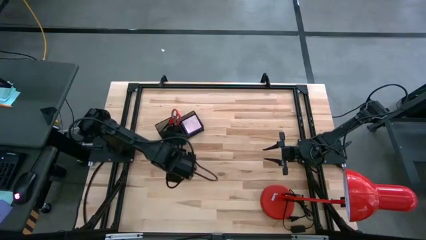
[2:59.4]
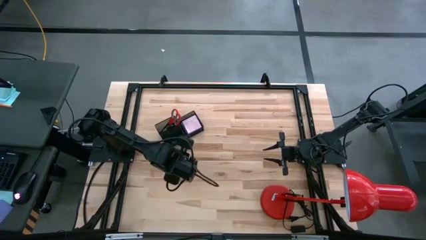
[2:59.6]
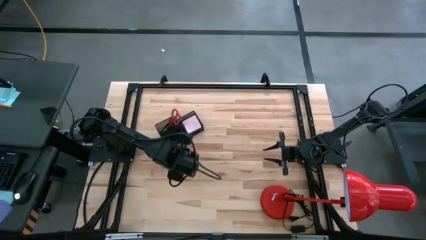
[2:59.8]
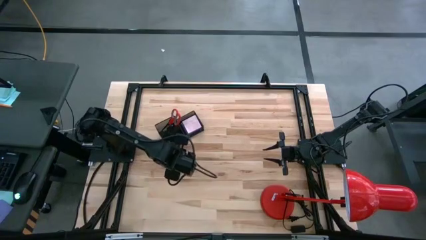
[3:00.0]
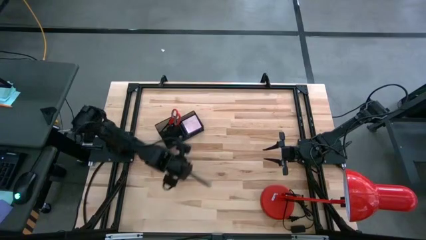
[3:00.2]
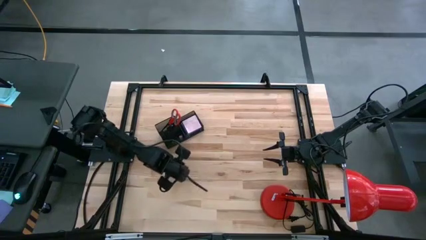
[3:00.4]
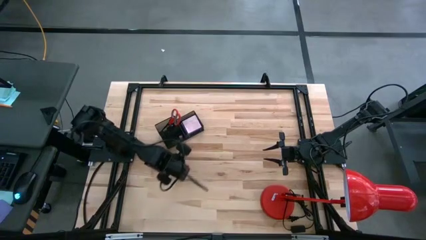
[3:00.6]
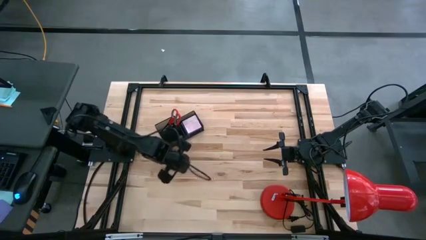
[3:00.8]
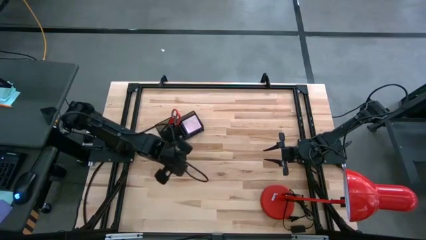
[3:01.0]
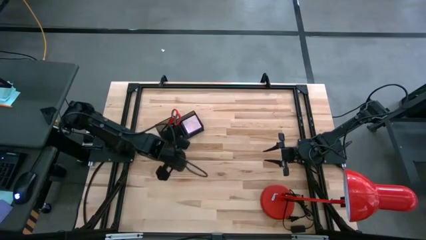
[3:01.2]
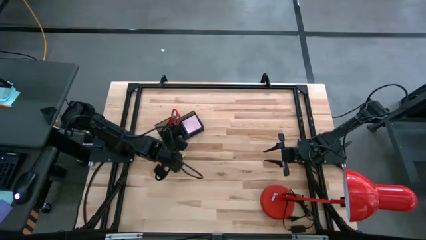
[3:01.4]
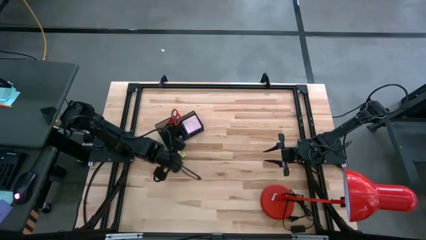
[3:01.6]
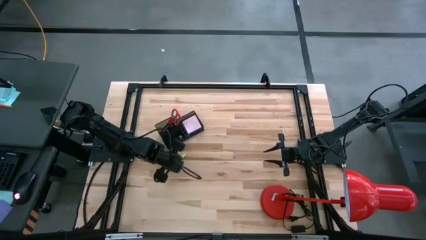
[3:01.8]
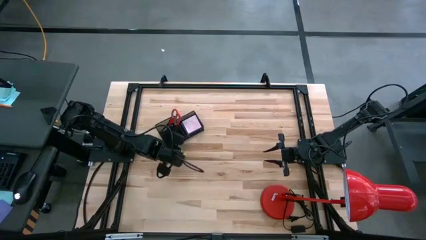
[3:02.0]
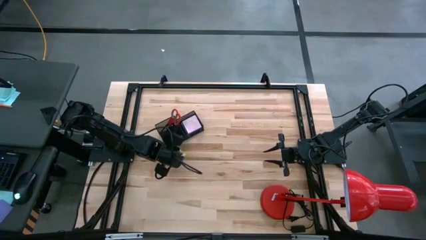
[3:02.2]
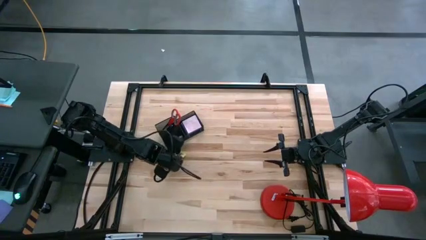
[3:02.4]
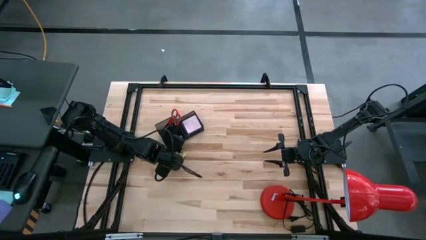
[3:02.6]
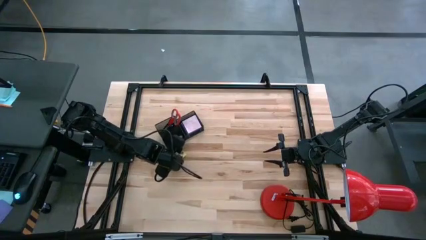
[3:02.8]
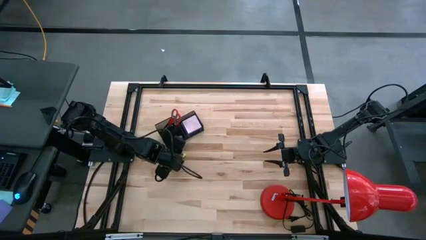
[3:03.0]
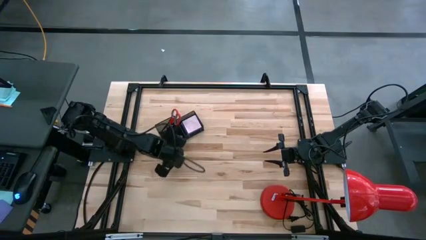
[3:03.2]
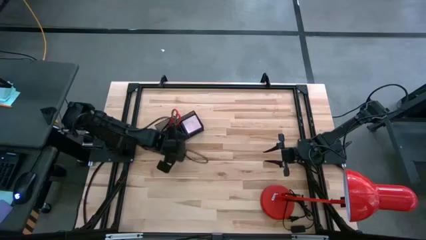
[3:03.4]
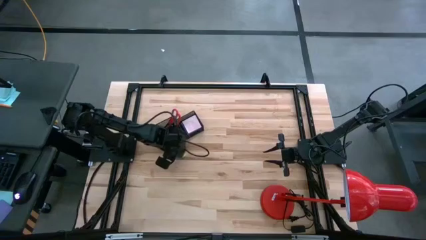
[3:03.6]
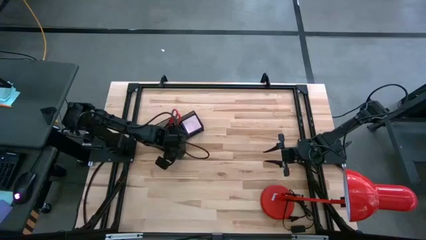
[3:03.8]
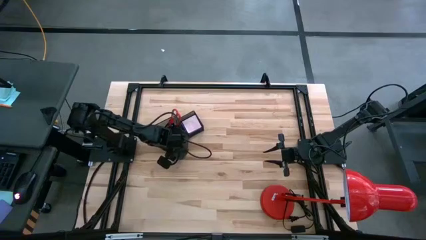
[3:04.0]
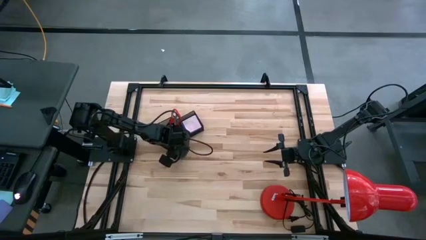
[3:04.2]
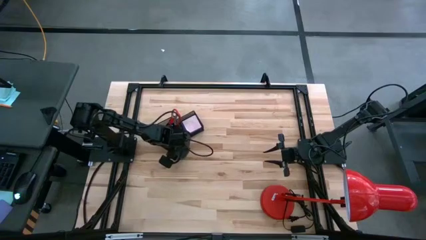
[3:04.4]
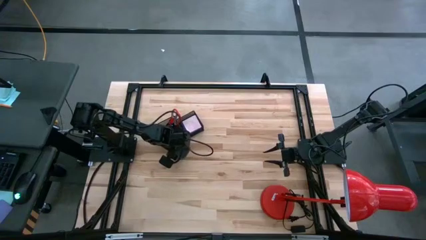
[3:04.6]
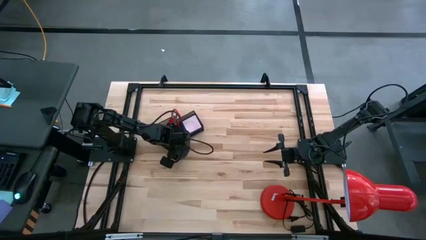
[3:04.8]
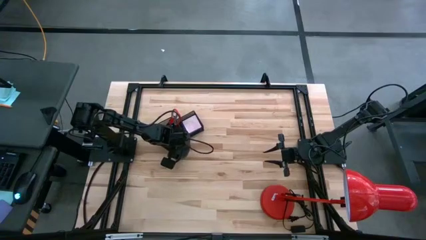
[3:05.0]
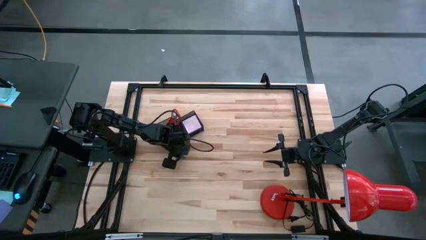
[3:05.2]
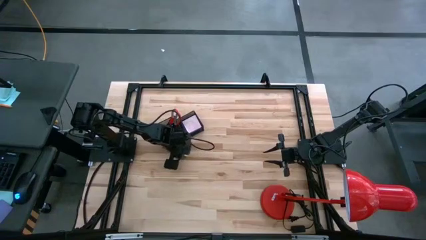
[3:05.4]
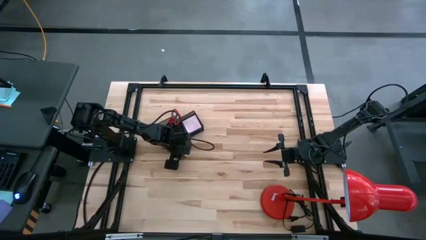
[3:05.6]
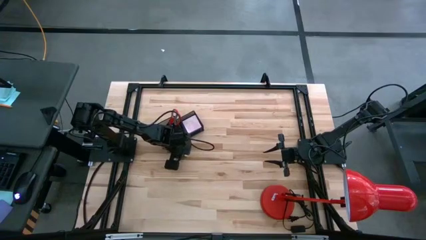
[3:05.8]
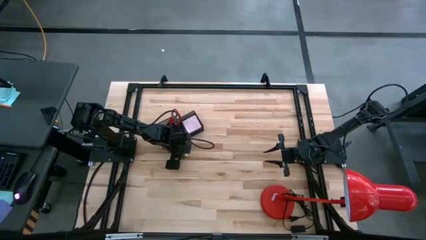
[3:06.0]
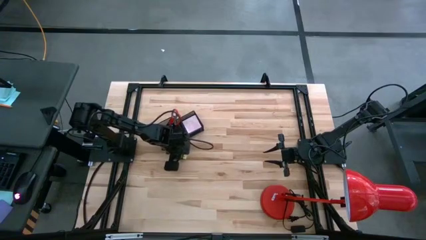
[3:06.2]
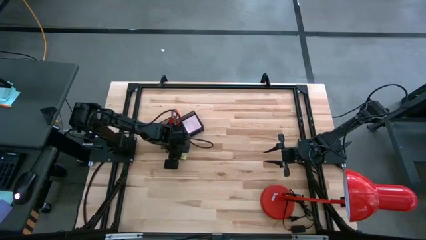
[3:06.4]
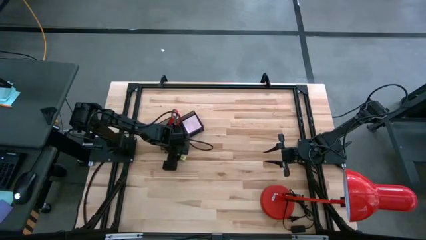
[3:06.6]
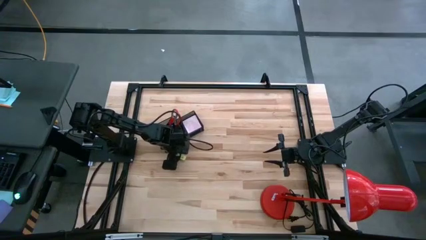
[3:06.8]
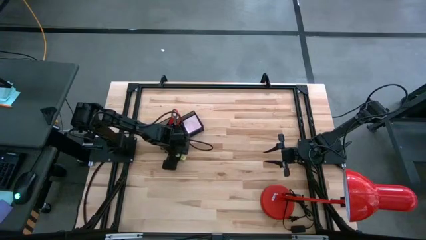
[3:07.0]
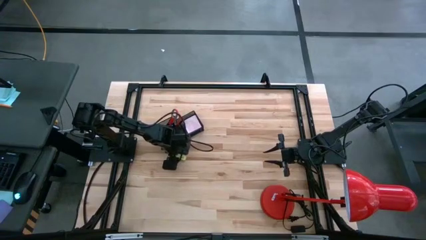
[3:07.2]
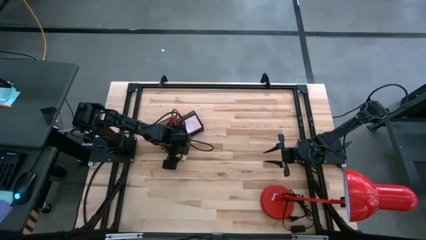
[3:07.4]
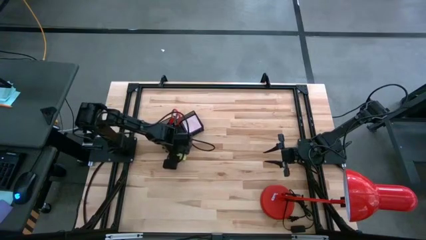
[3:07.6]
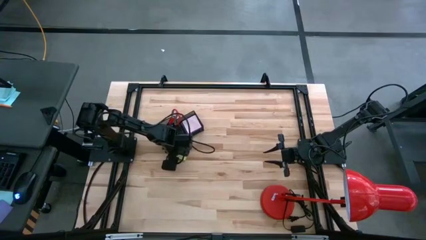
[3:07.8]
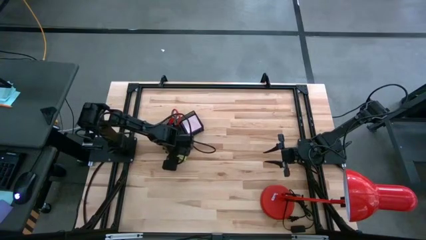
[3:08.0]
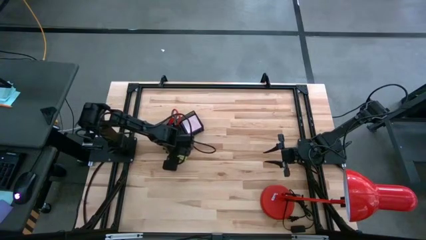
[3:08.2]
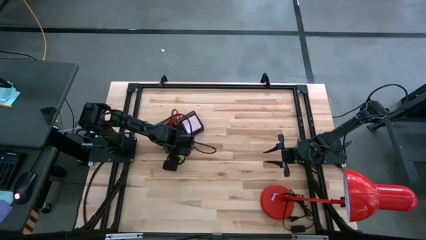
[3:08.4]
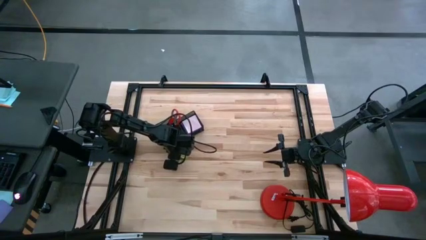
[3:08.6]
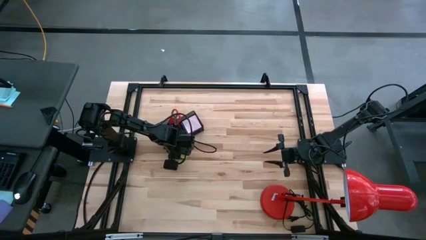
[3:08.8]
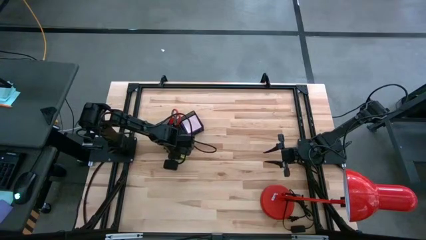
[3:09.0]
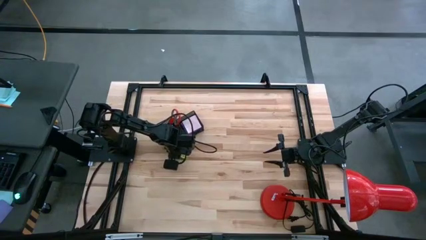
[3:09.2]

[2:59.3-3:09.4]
Task: Pick and place office supplies into organizer
Put the eraser into the desk organizer

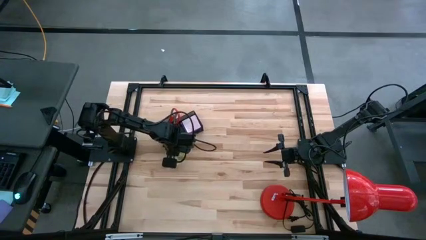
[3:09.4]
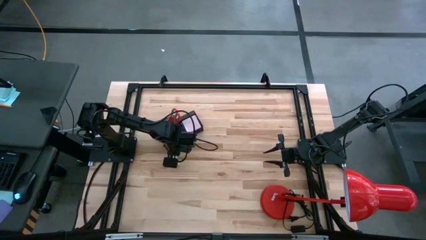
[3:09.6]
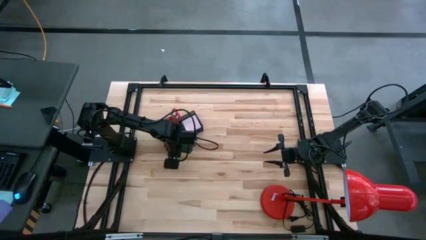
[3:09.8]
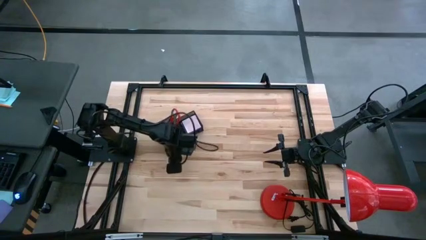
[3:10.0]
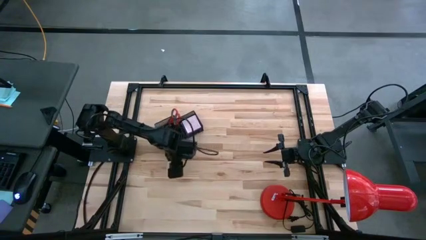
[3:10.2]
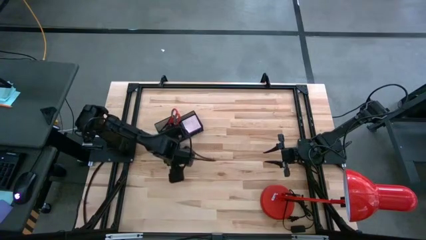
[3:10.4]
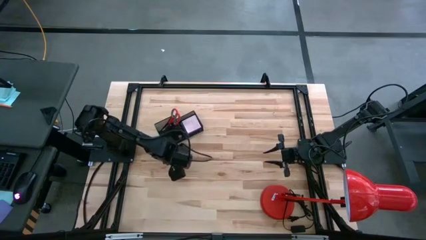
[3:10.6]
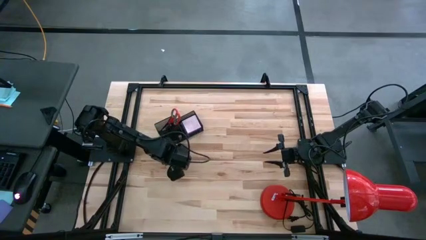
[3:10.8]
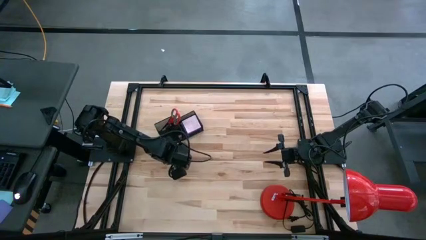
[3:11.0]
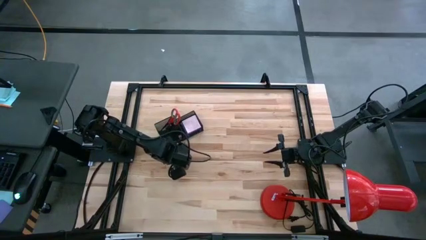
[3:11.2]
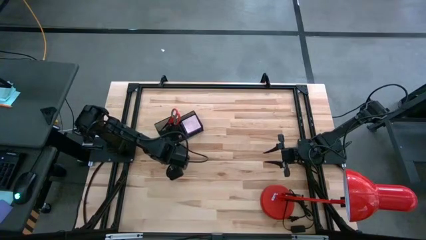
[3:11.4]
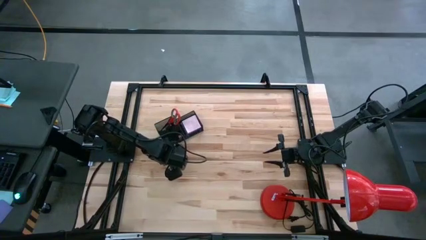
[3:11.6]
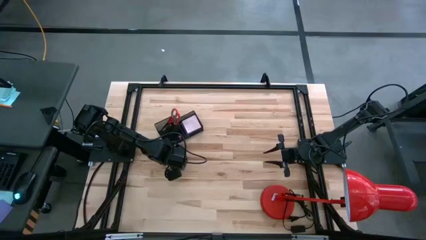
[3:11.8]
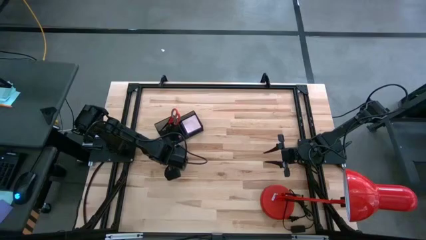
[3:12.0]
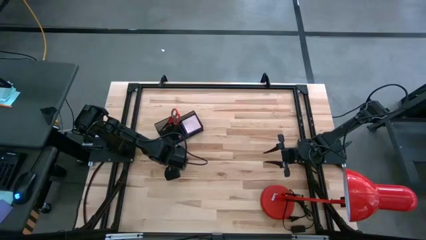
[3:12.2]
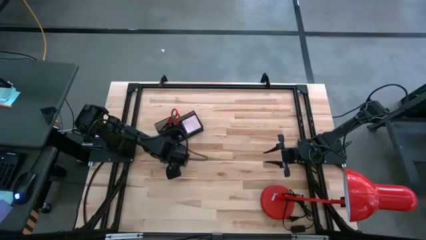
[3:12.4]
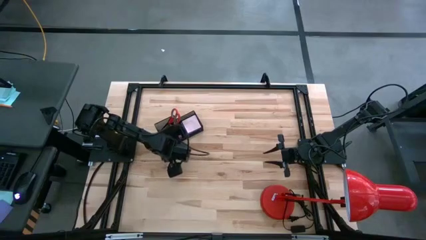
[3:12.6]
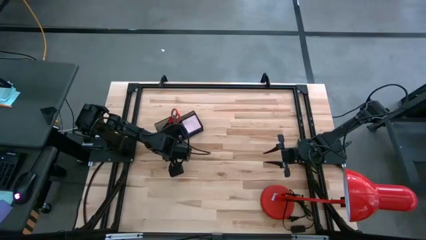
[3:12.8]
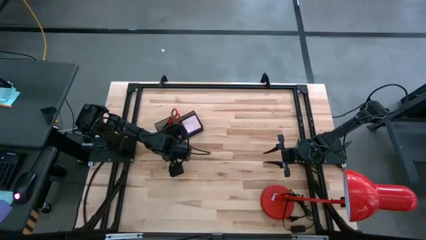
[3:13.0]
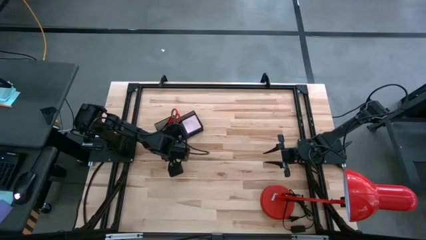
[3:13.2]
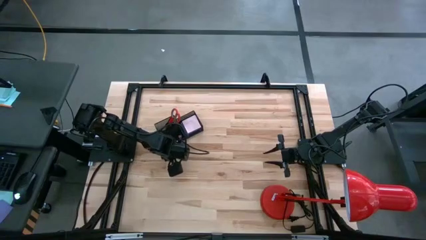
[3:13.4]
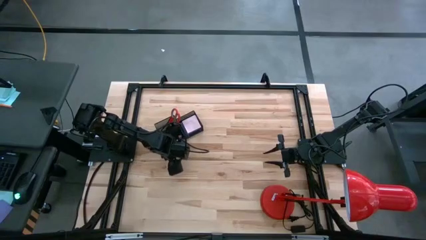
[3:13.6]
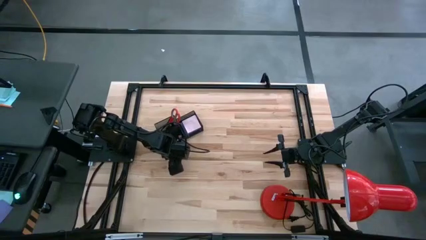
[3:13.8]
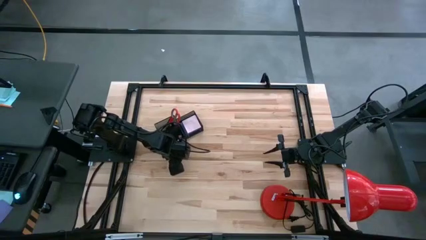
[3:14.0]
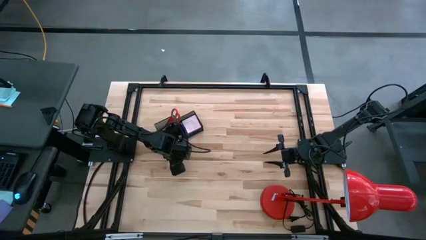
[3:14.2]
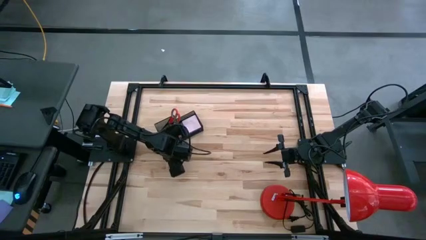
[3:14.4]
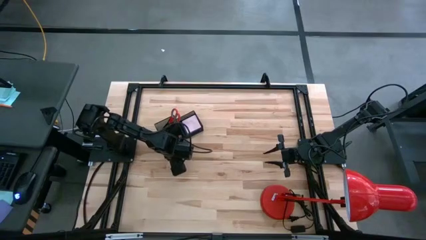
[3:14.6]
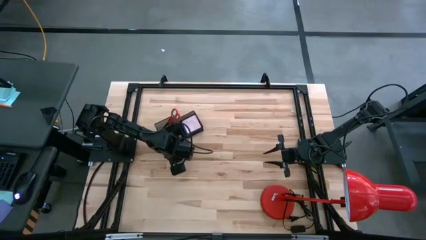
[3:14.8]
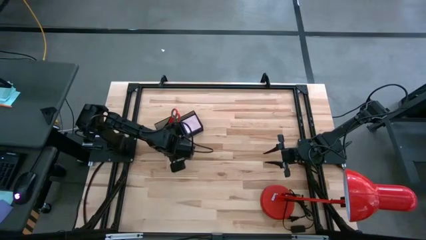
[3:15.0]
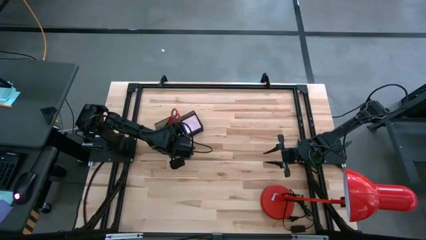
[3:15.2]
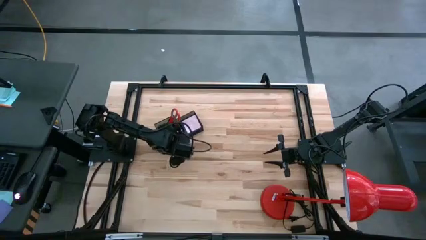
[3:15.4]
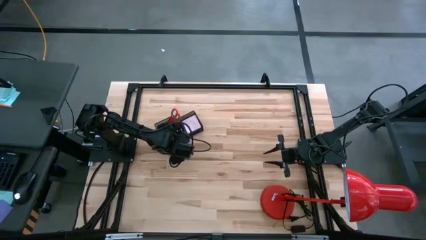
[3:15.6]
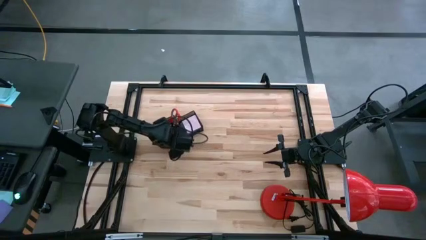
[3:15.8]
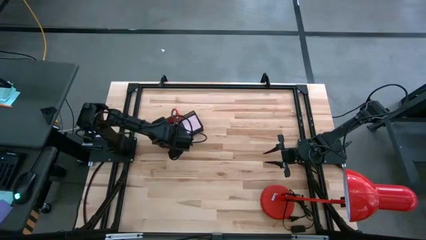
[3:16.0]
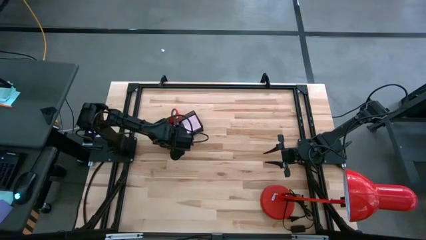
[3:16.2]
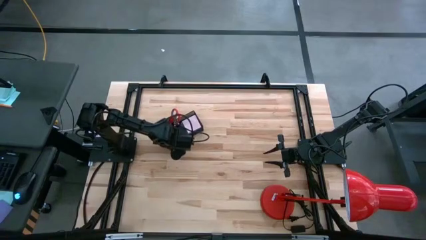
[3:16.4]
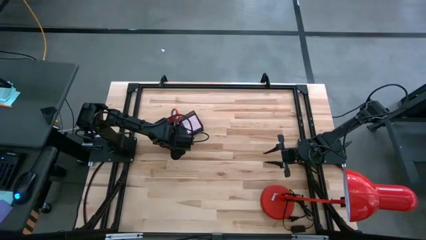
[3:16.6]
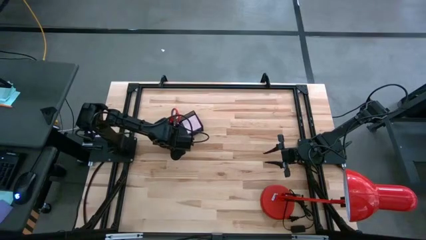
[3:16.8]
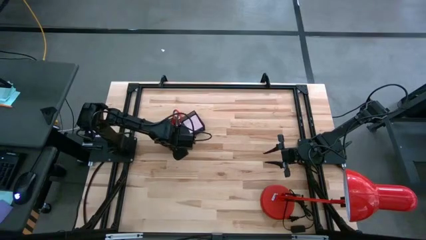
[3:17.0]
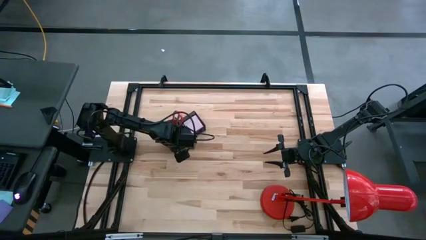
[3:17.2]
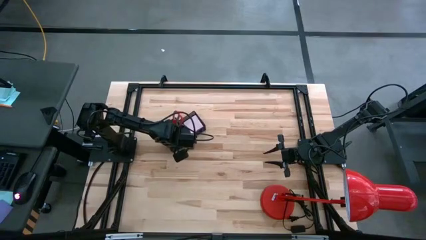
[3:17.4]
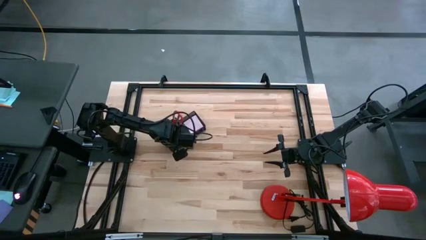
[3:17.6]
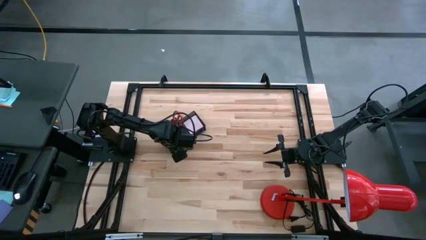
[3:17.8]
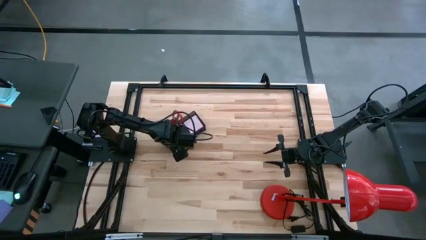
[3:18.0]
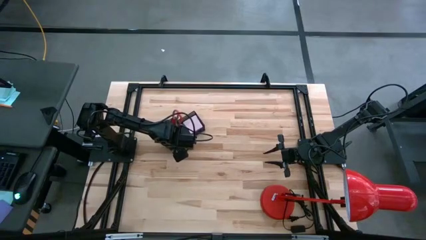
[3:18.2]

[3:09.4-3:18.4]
Put the eraser into the desk organizer
